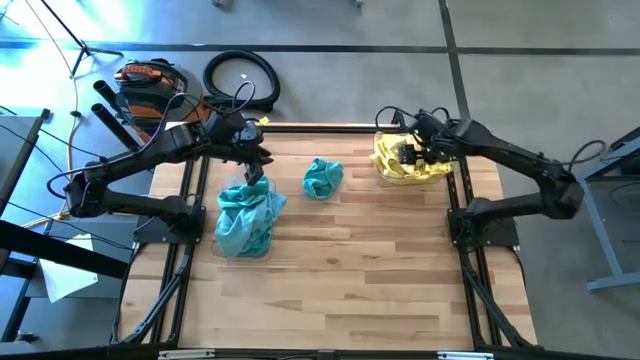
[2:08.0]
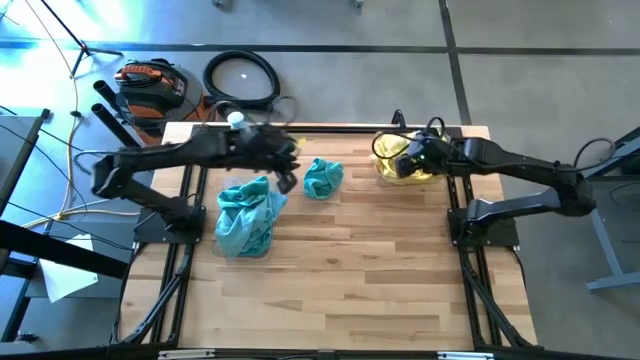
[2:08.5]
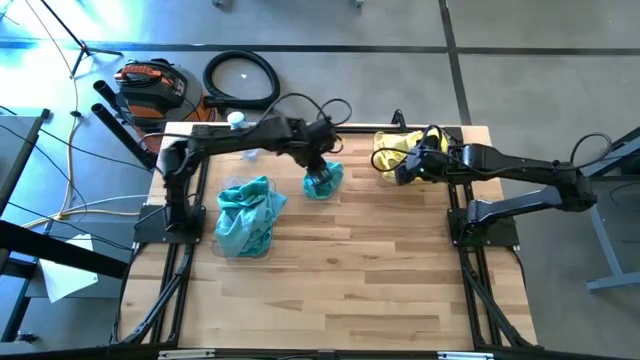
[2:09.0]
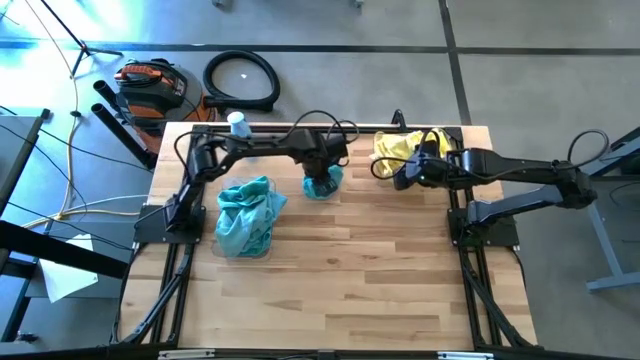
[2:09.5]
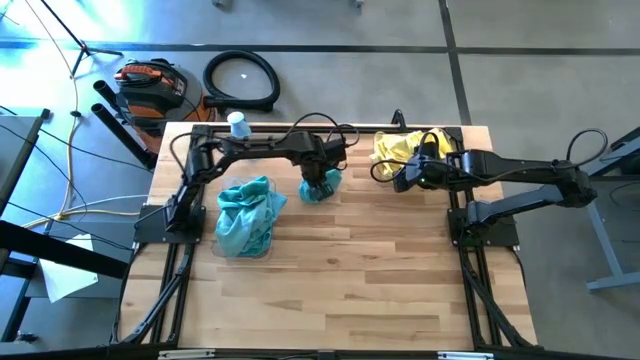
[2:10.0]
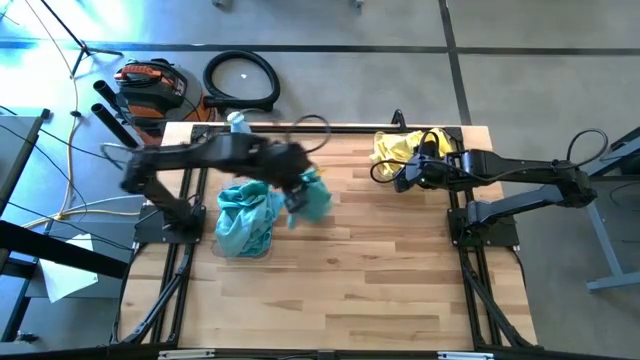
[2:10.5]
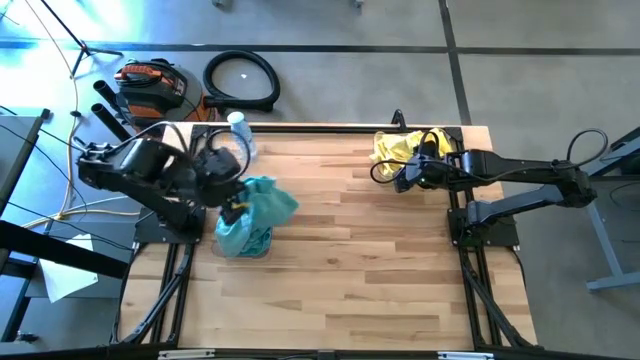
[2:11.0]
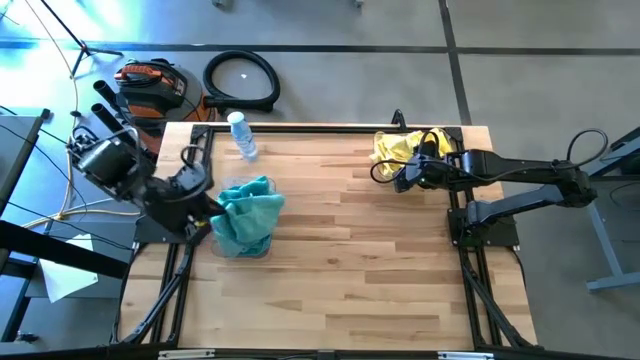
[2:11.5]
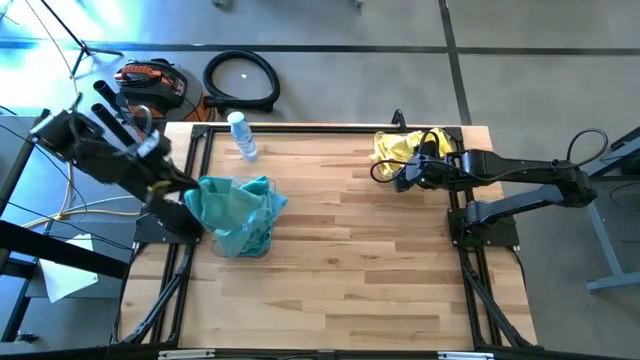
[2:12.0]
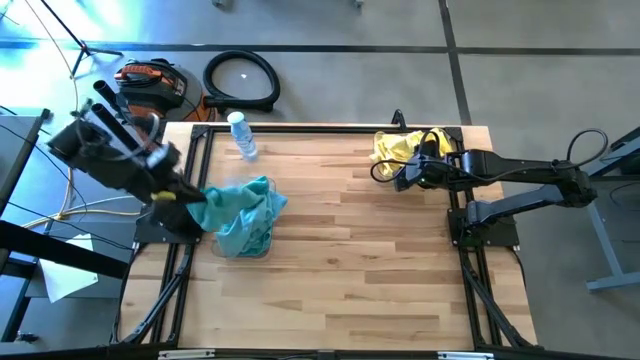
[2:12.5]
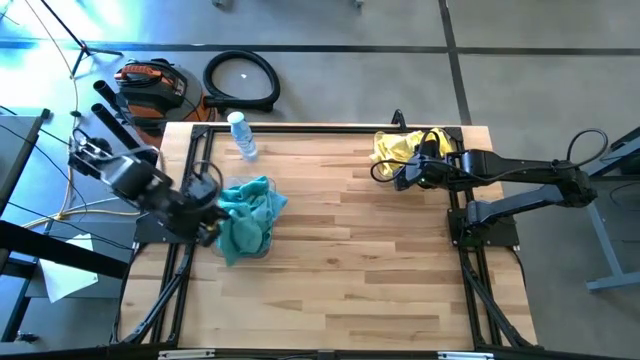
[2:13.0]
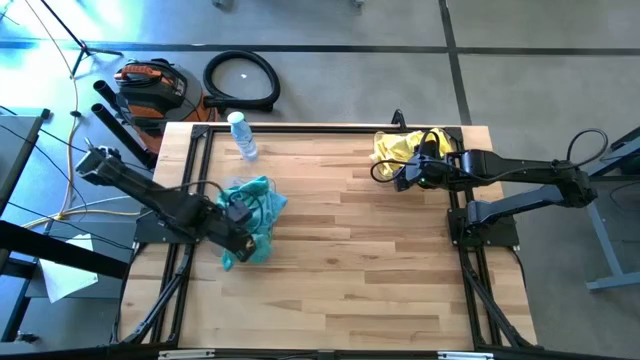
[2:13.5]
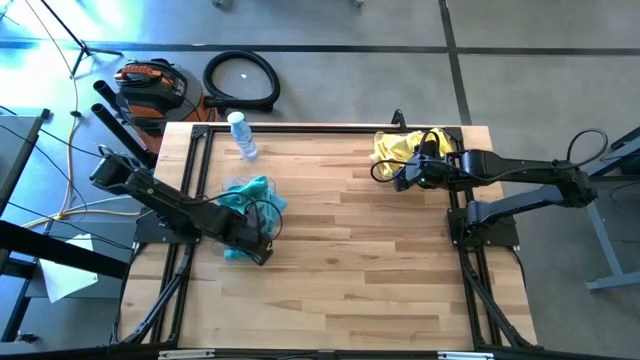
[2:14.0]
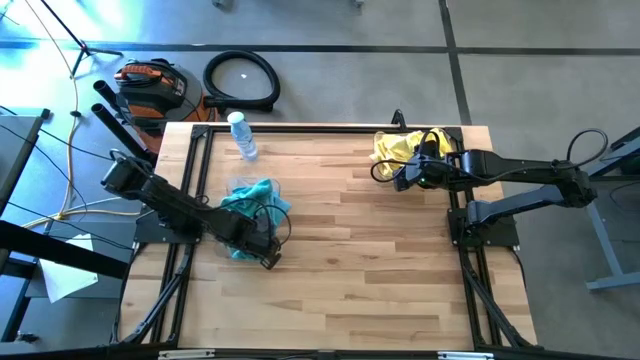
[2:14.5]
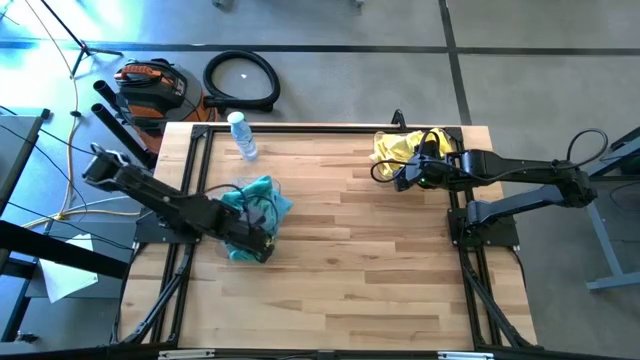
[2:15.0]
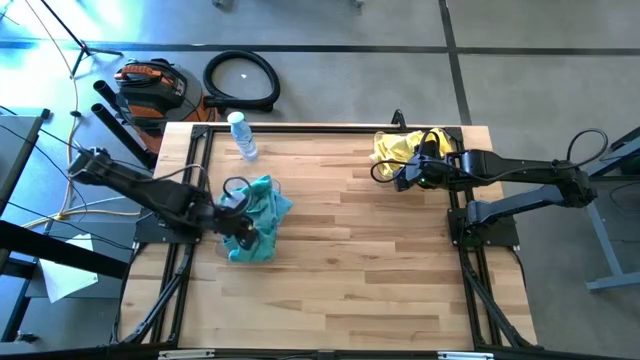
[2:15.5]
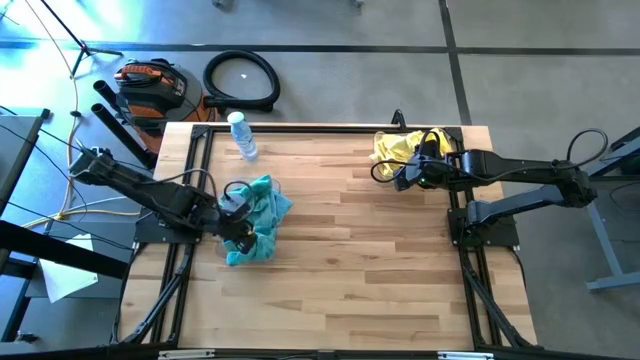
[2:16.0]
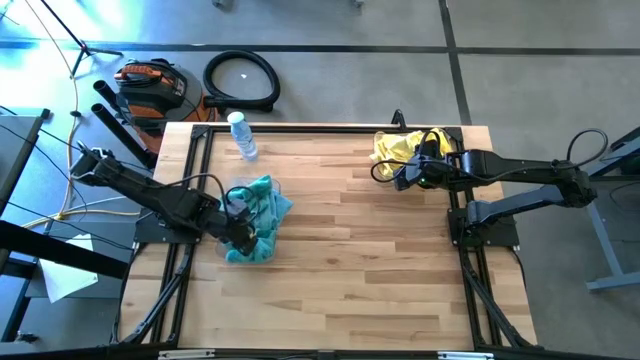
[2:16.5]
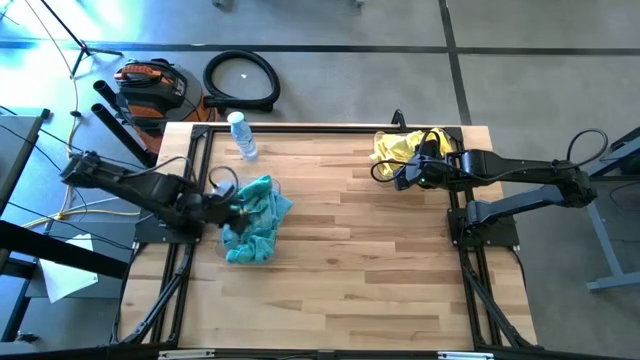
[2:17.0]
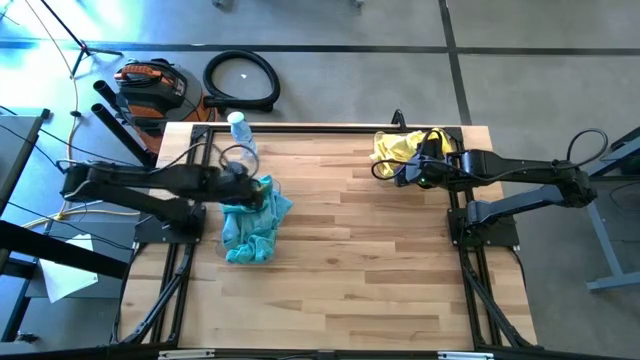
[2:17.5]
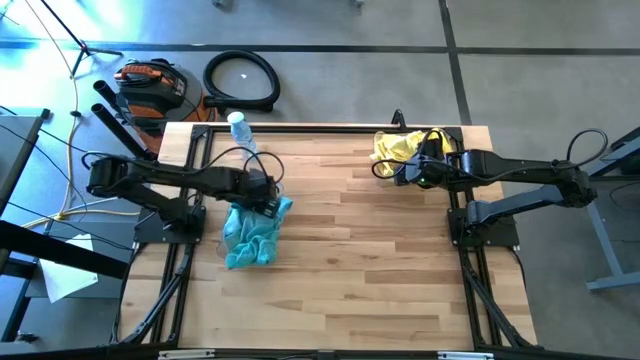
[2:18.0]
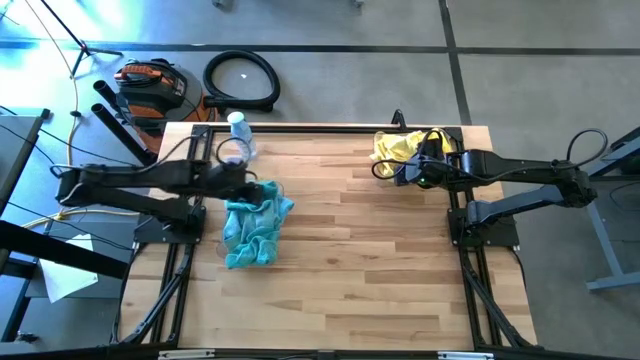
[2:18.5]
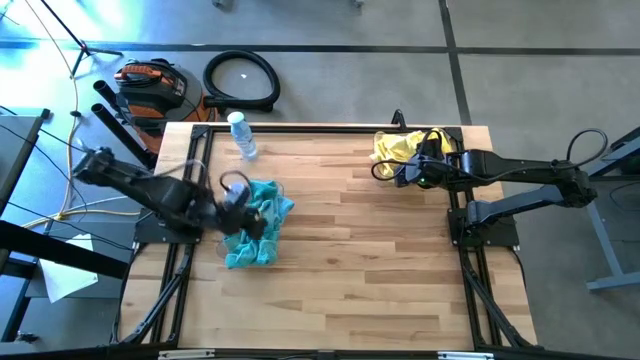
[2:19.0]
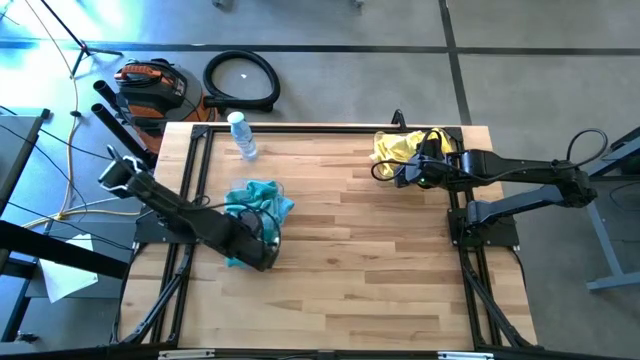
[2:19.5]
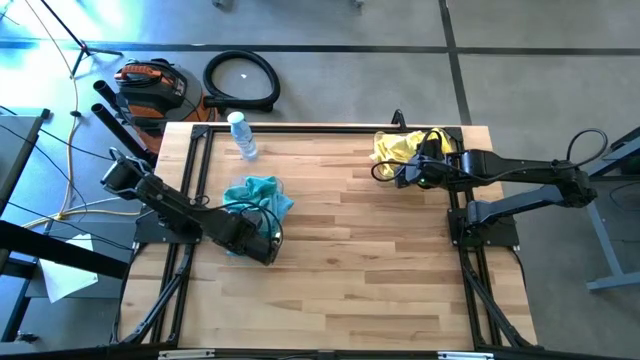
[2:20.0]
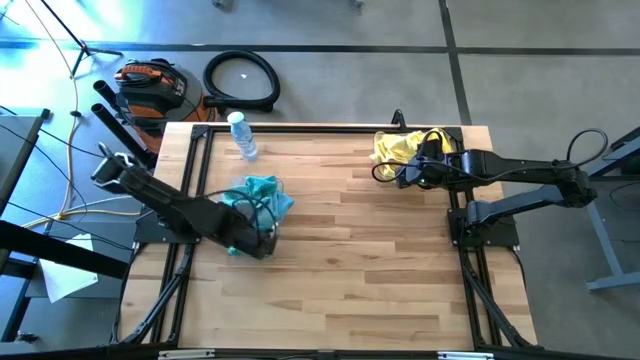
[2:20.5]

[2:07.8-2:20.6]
Task: Sort microfiber towel by color & place in baskets
Put the blue microfiber cloth into the left transparent bin

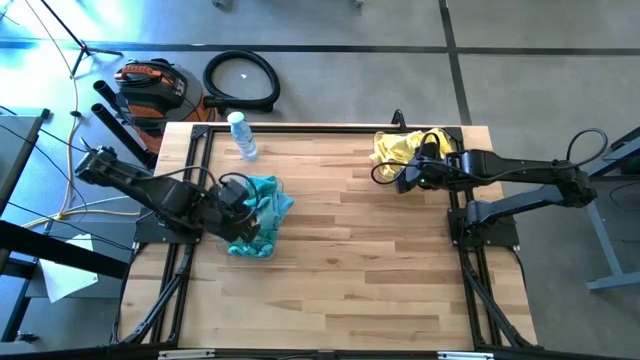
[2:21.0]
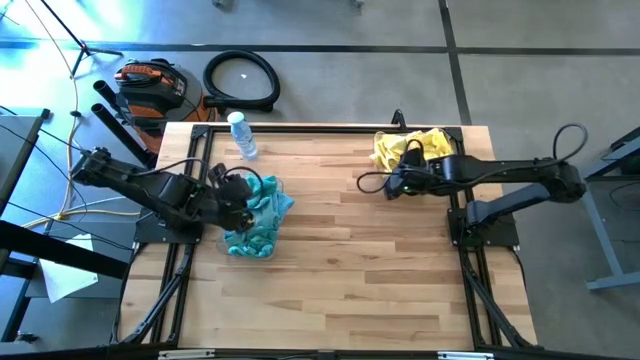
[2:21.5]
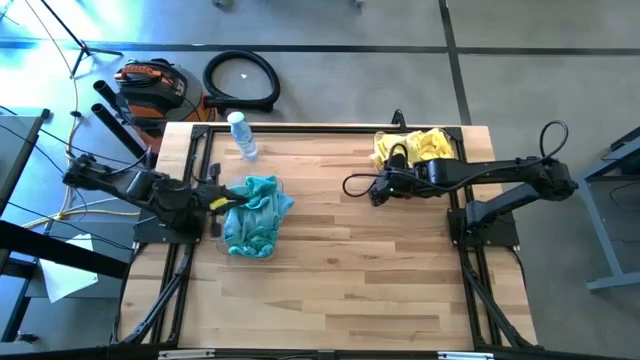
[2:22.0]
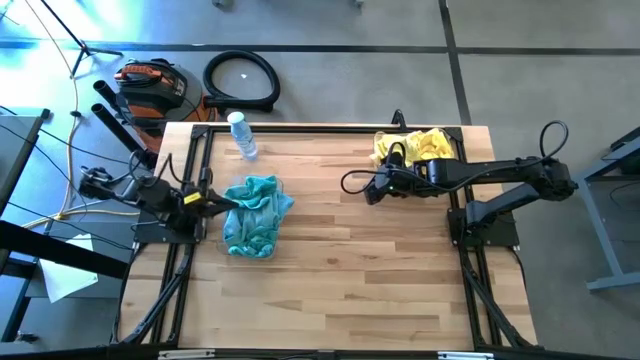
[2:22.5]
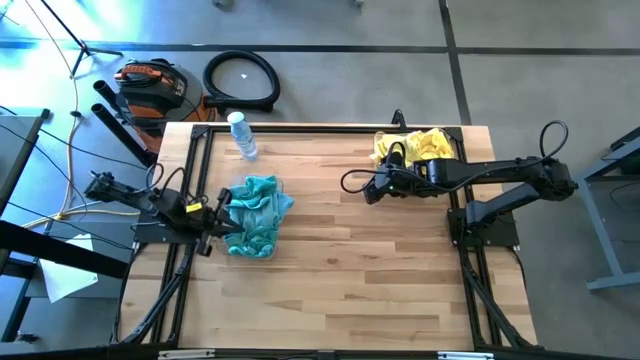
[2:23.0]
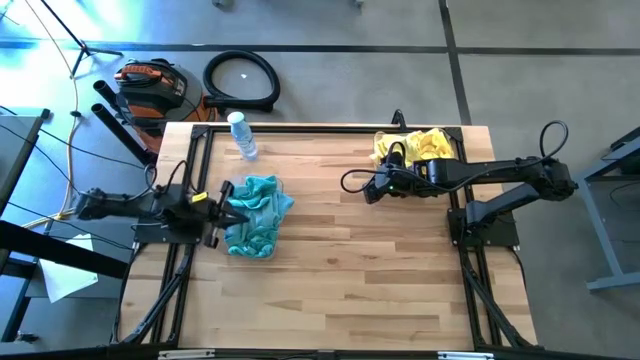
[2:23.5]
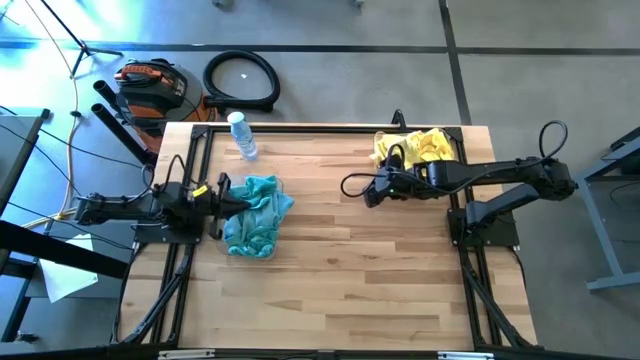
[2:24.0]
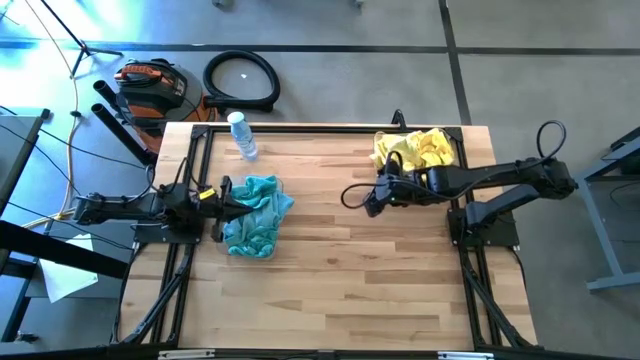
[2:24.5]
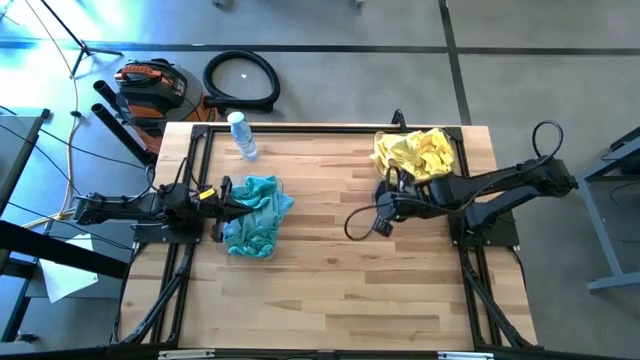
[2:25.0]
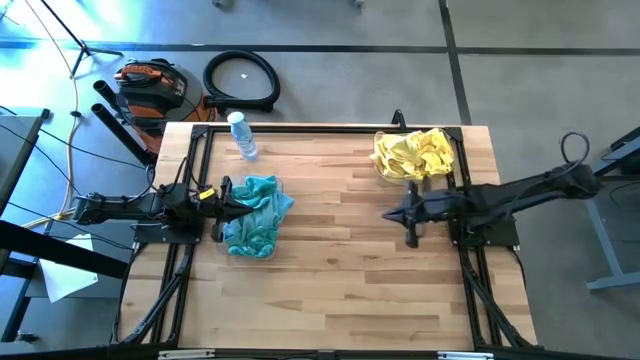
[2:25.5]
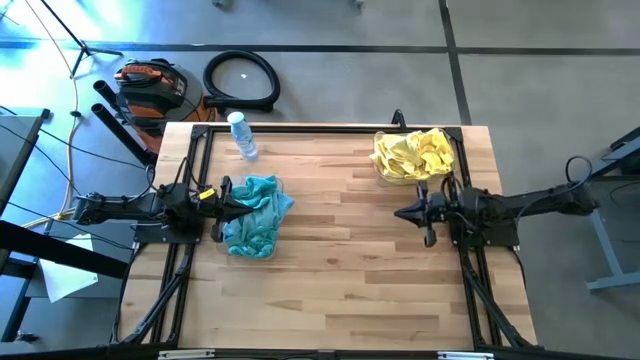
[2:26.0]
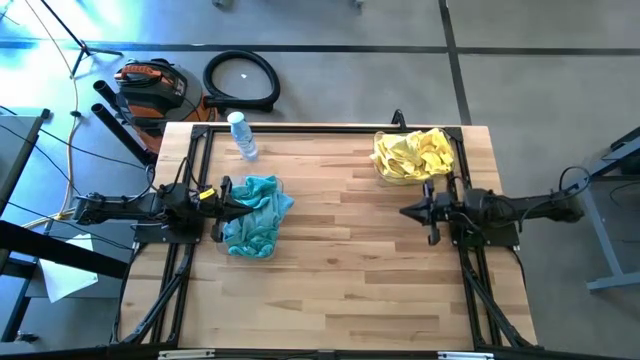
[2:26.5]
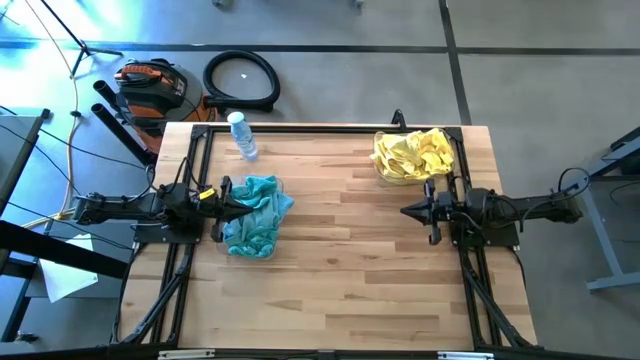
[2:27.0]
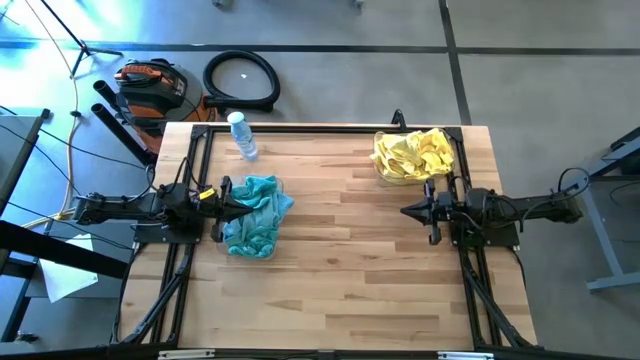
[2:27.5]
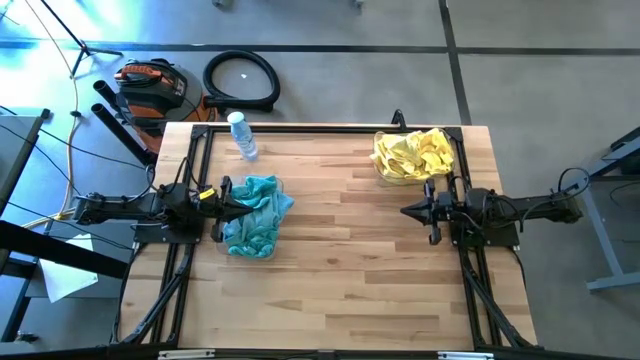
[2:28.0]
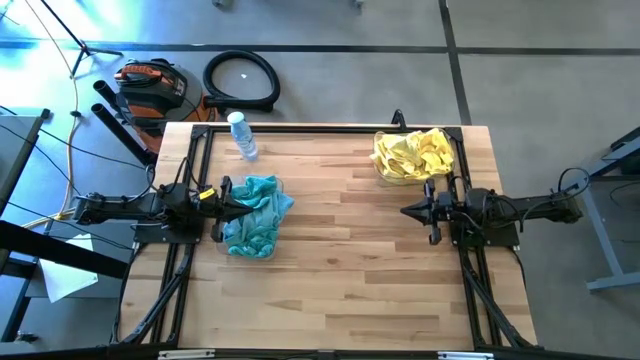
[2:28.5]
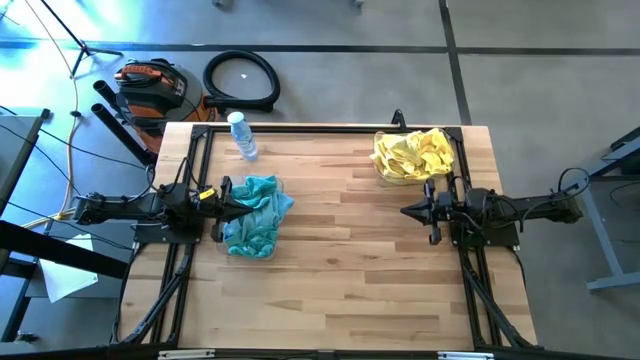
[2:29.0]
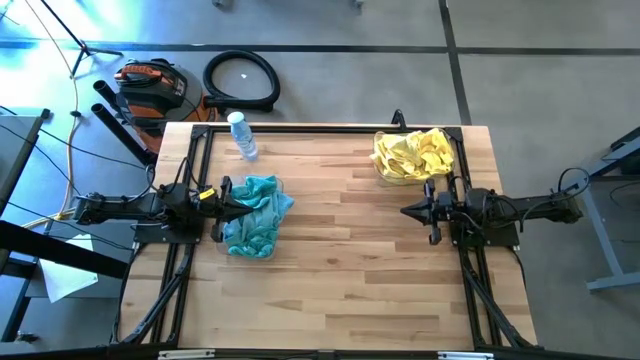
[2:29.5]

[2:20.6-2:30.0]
Return to Home Position
